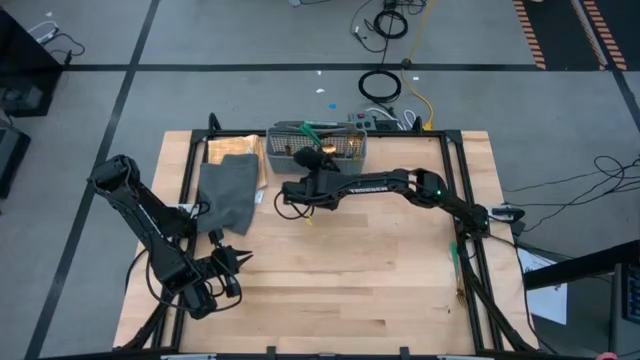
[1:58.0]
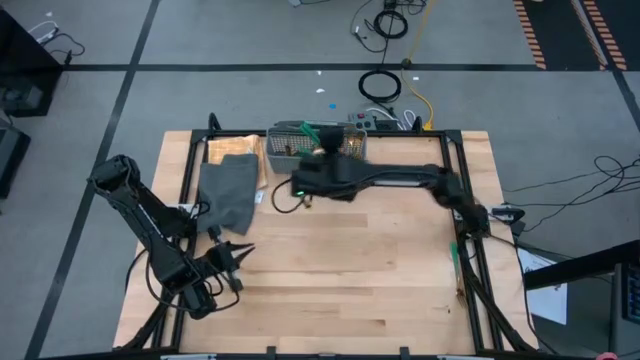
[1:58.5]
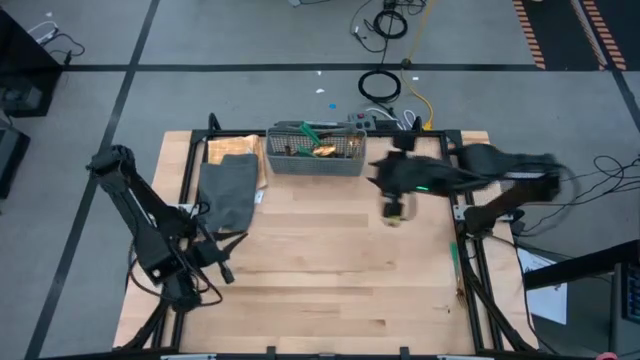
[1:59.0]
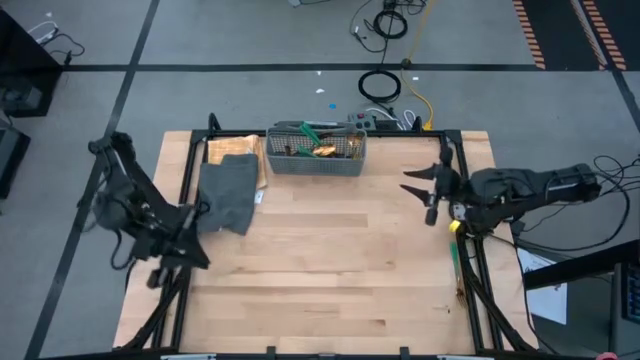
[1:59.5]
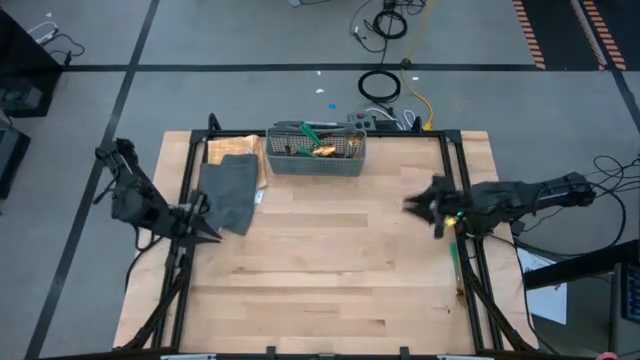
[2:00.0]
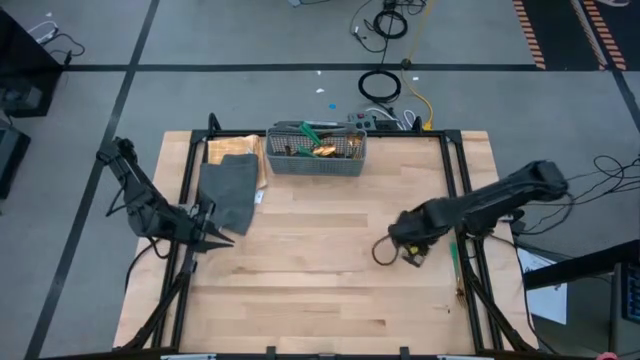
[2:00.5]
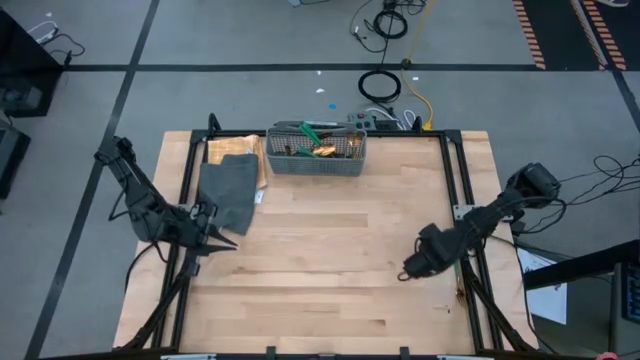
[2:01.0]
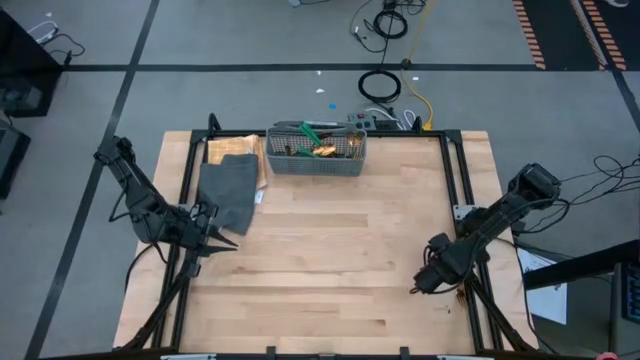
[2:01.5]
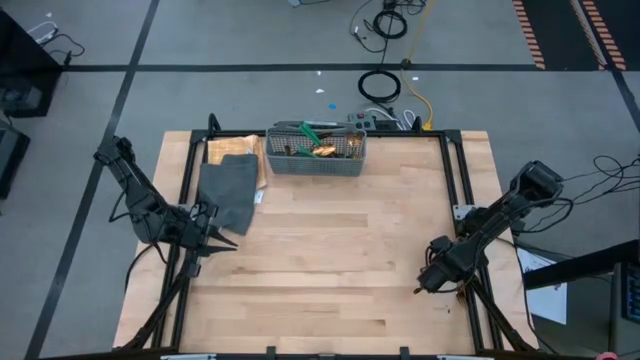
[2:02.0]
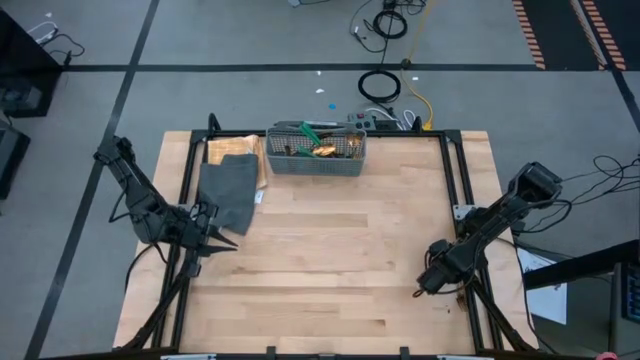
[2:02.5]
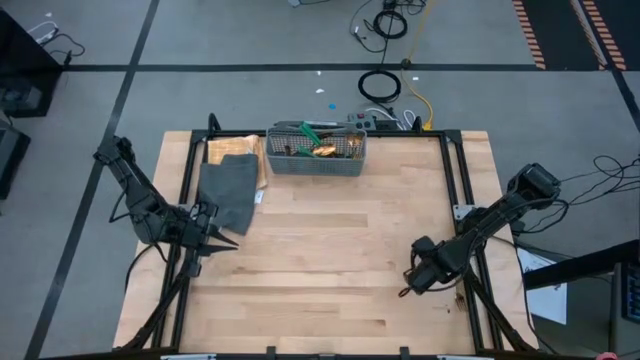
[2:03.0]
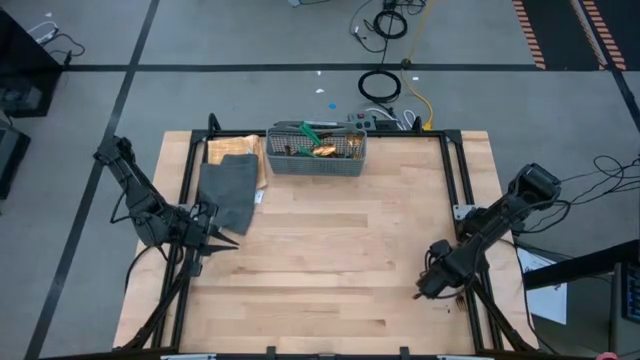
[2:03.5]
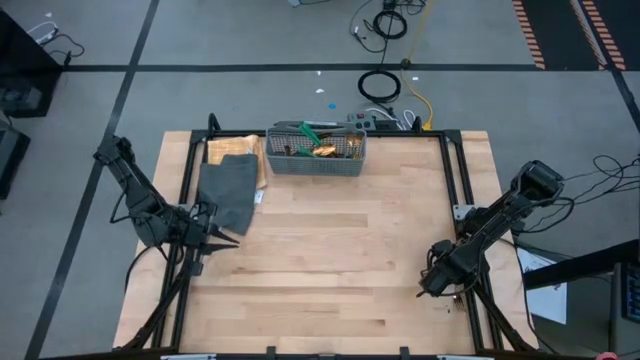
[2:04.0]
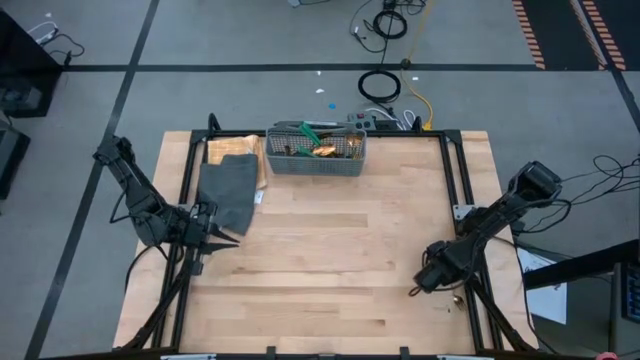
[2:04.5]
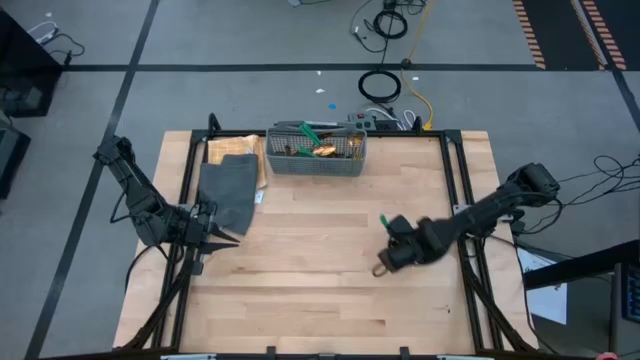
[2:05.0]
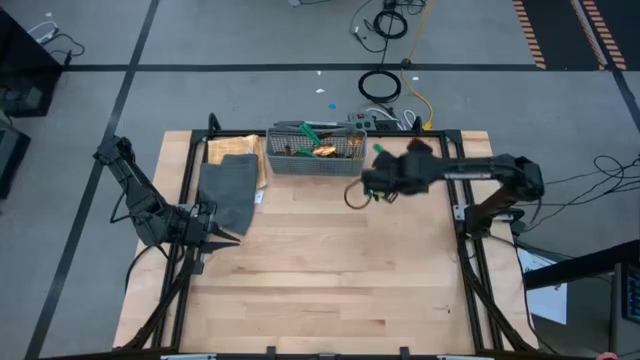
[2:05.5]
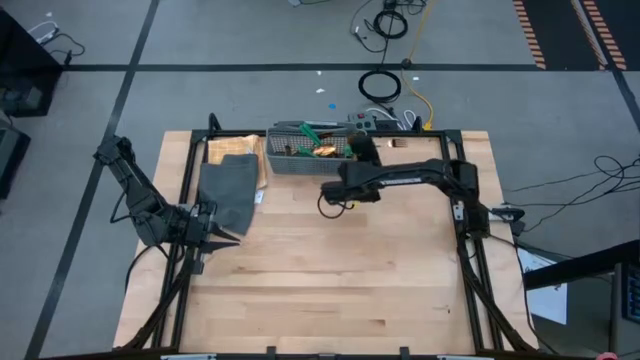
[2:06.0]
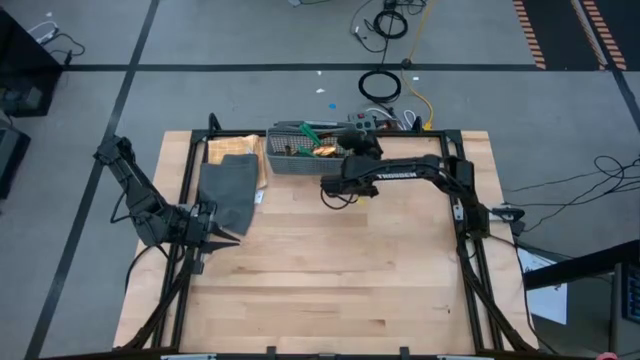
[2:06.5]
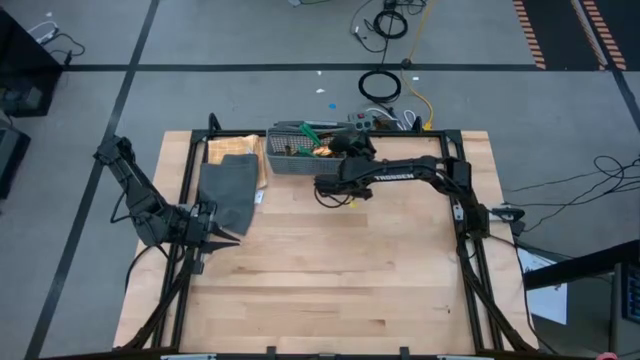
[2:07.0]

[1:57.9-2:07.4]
Task: Sort silverware
Put the green fork into the gray silverware basket

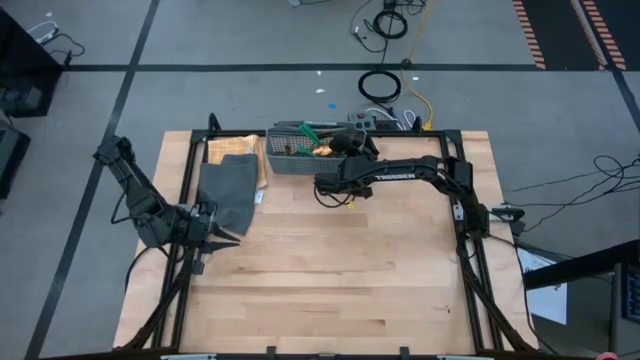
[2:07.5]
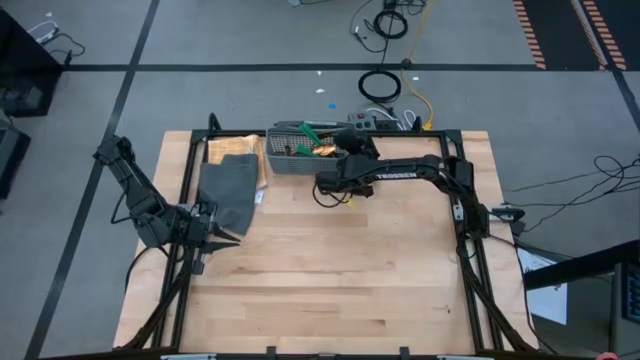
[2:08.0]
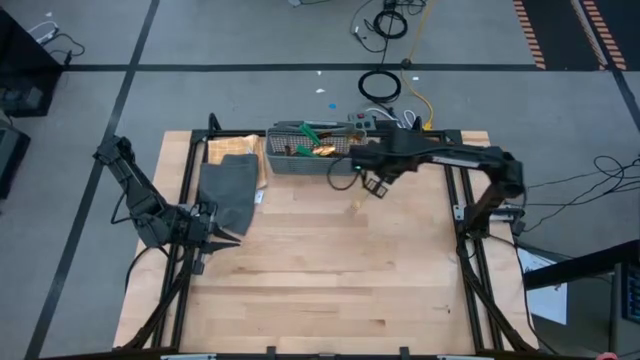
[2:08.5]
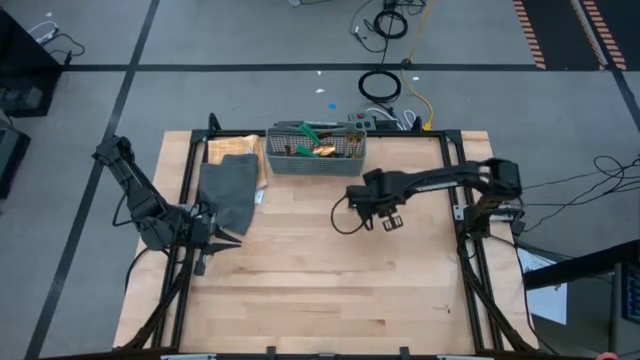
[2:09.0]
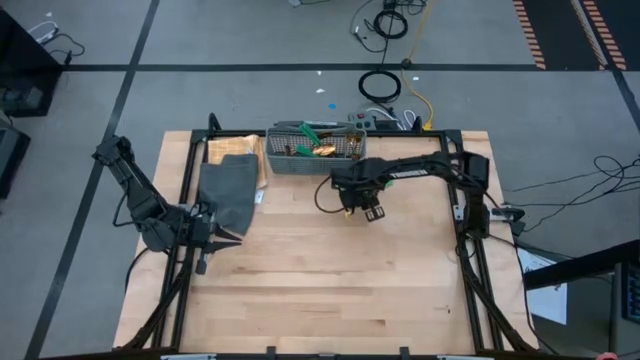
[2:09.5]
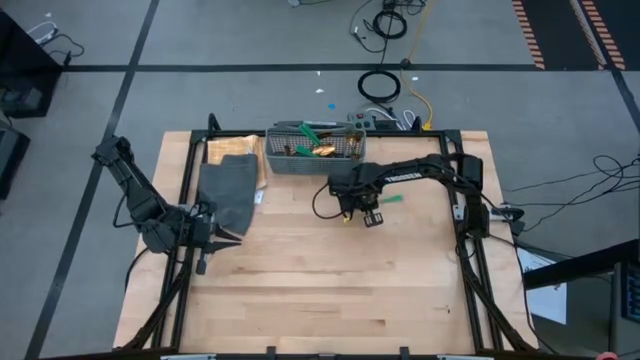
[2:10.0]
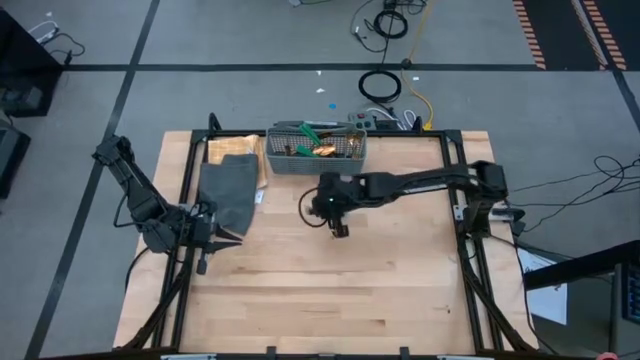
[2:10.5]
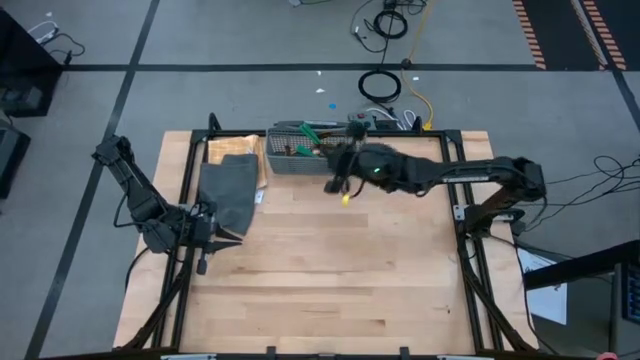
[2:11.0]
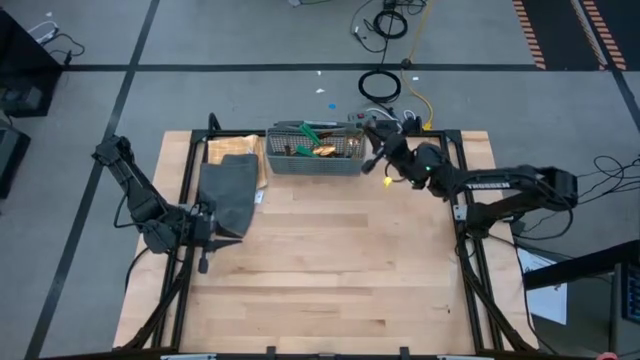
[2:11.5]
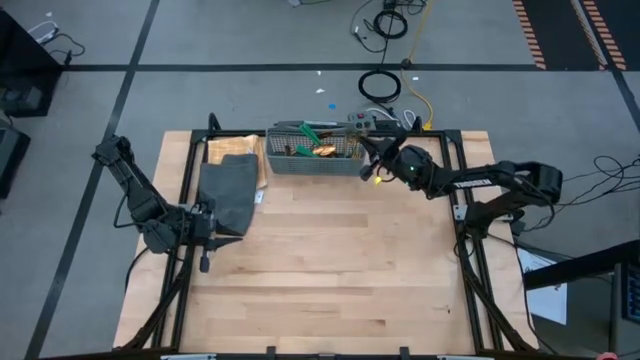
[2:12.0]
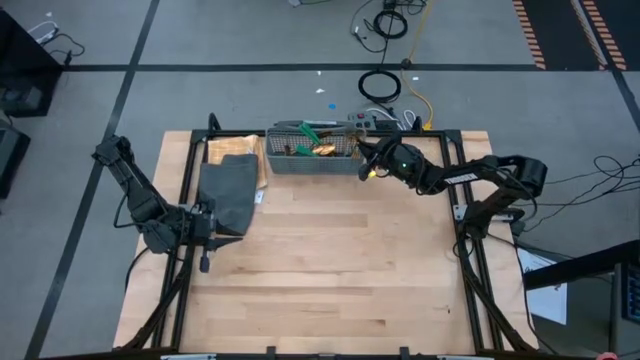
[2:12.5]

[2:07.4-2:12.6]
Put the green fork into the gray silverware basket

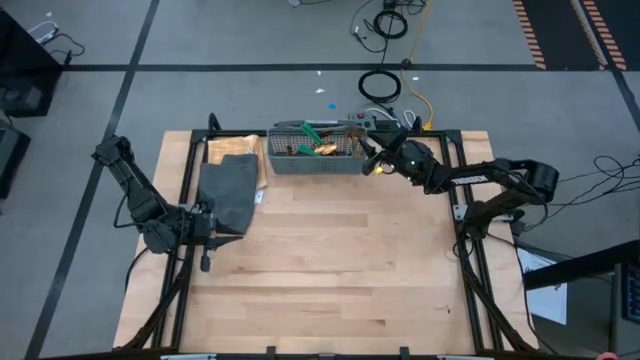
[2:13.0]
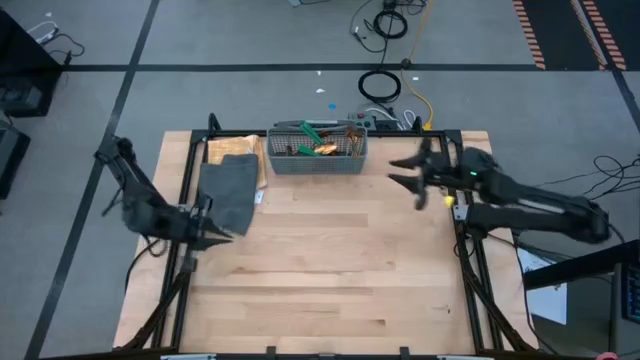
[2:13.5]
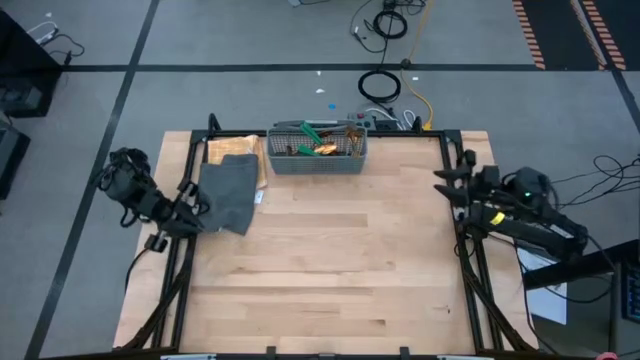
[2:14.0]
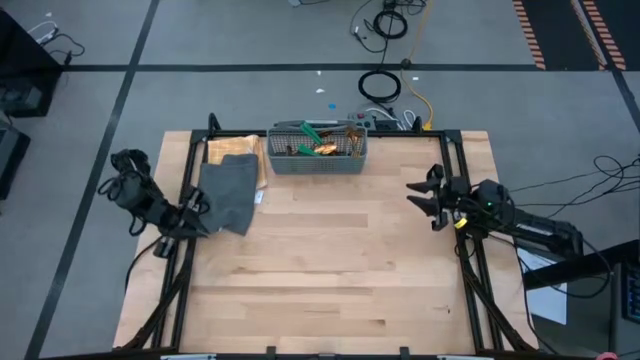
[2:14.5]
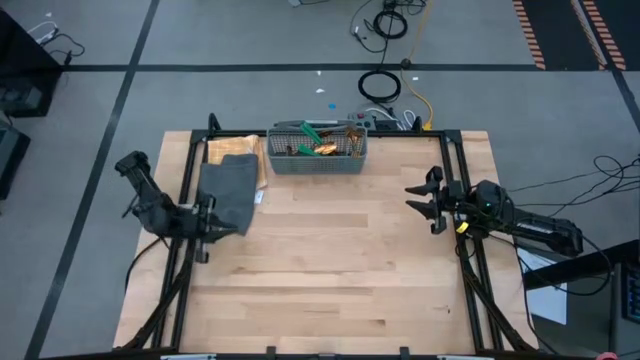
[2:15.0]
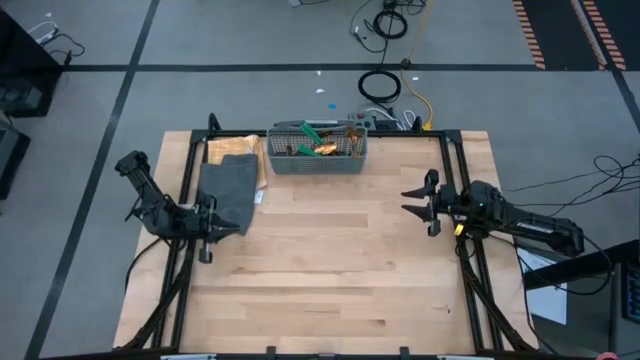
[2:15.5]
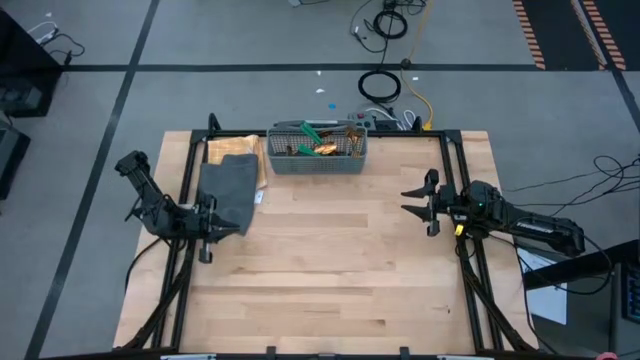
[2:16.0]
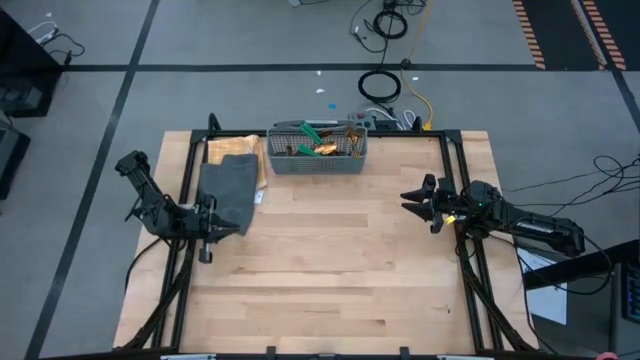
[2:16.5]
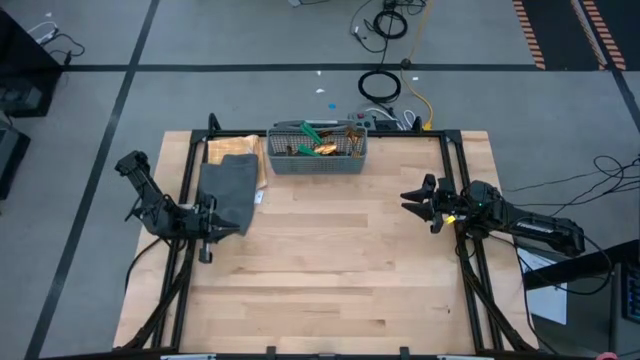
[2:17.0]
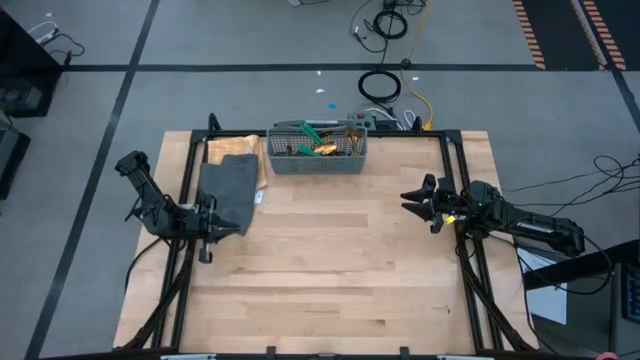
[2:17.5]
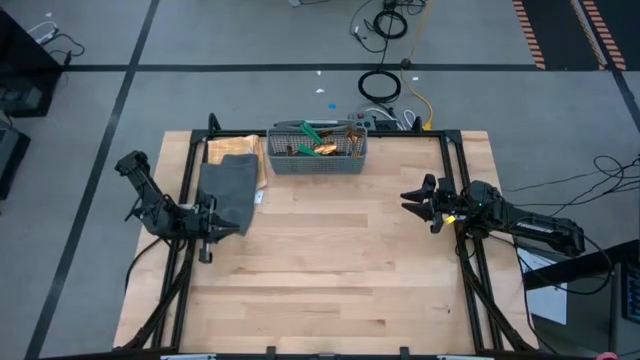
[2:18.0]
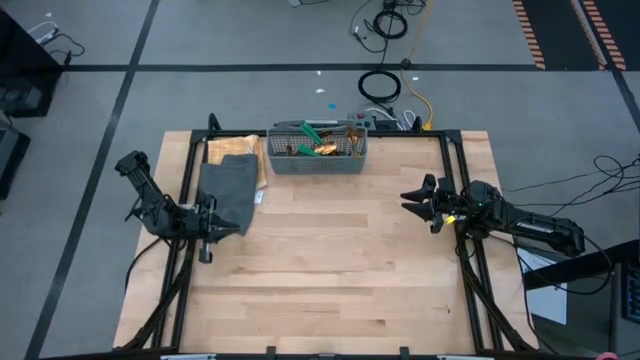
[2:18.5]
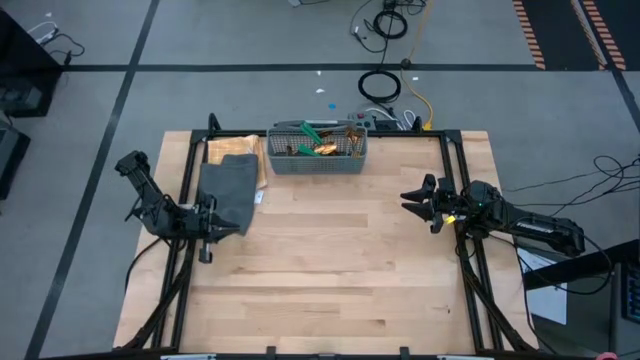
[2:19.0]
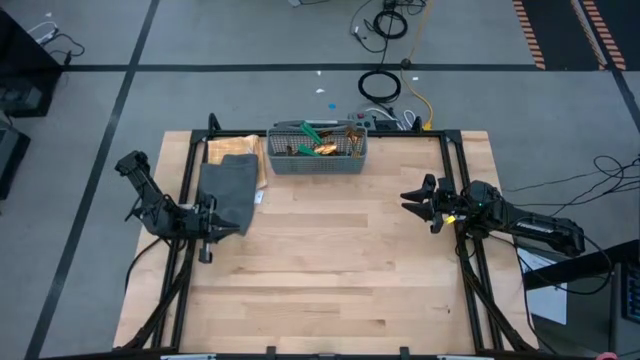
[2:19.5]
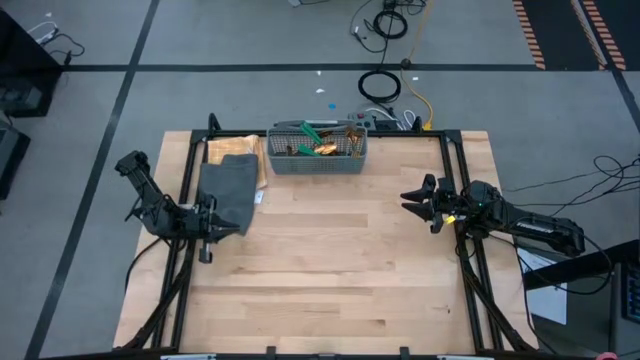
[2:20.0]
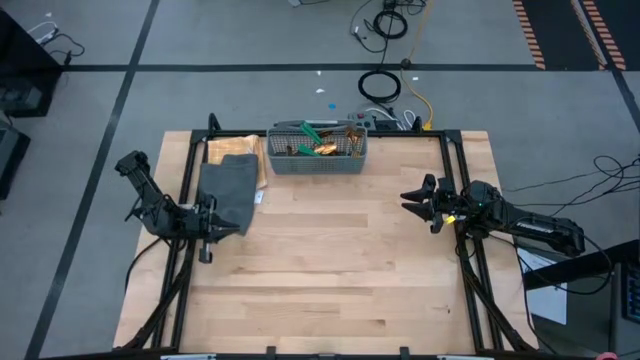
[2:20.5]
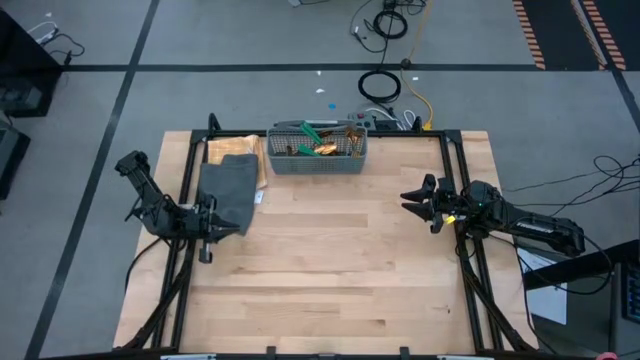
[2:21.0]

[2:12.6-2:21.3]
Return to Home Position
